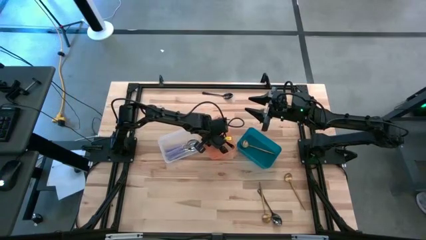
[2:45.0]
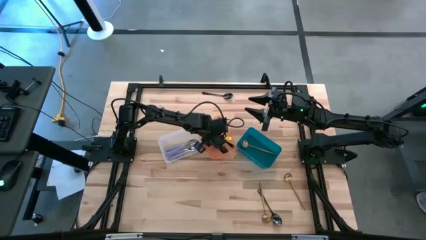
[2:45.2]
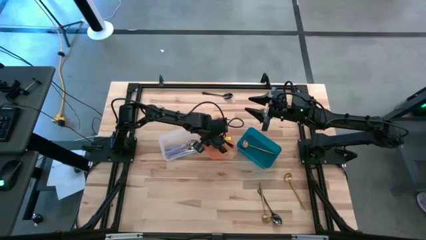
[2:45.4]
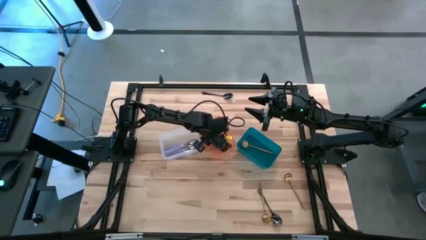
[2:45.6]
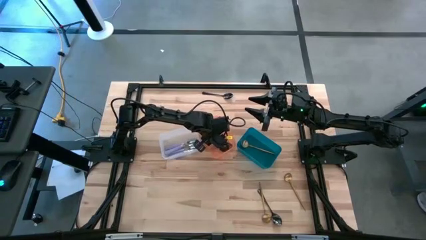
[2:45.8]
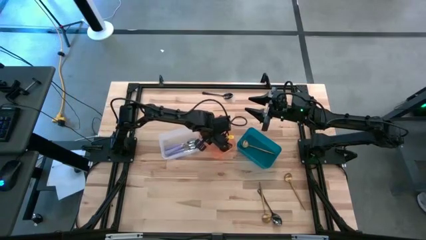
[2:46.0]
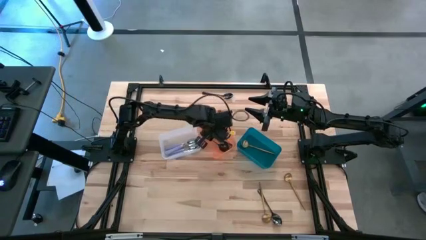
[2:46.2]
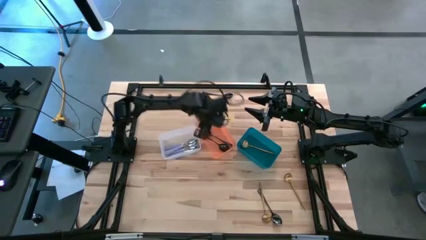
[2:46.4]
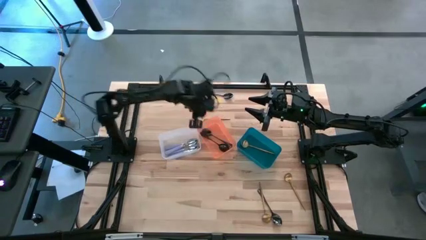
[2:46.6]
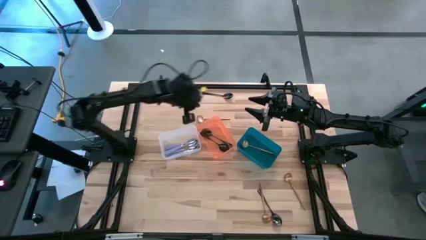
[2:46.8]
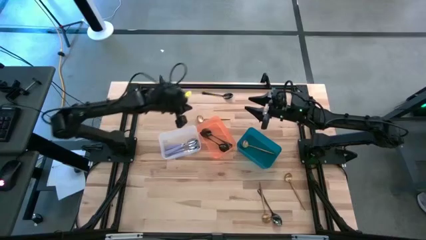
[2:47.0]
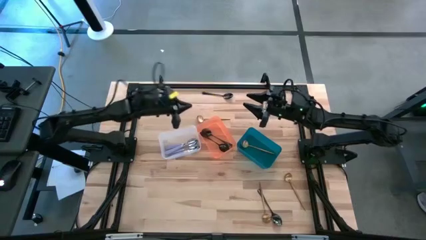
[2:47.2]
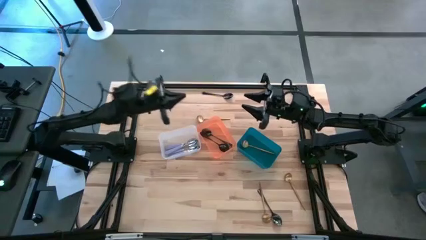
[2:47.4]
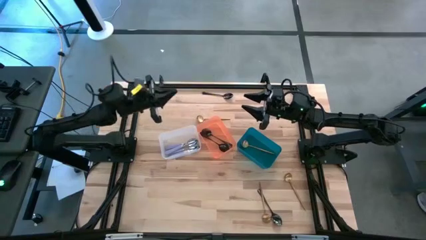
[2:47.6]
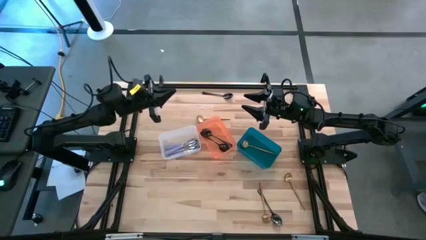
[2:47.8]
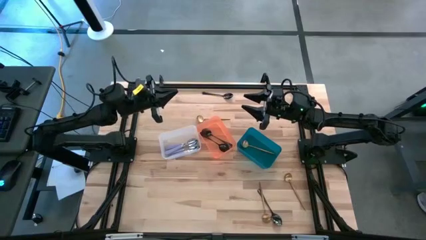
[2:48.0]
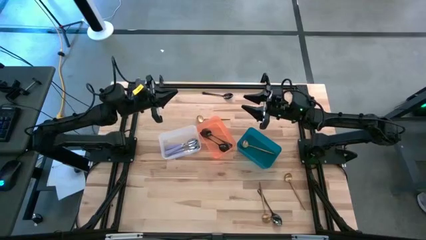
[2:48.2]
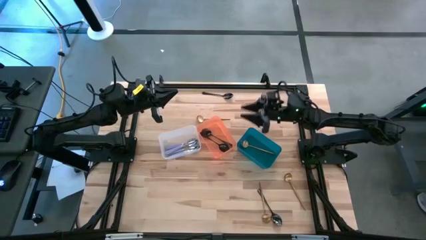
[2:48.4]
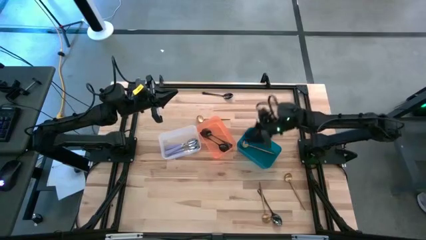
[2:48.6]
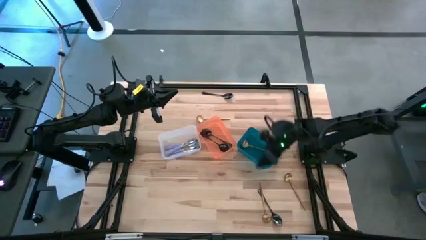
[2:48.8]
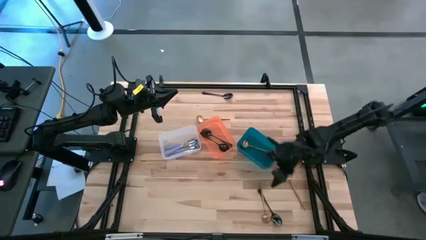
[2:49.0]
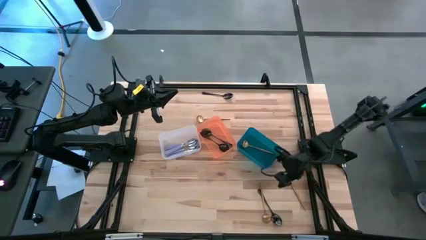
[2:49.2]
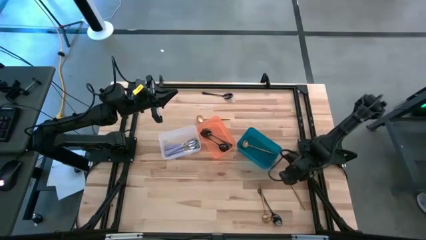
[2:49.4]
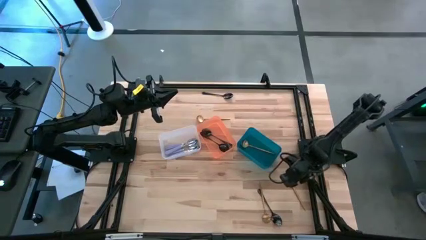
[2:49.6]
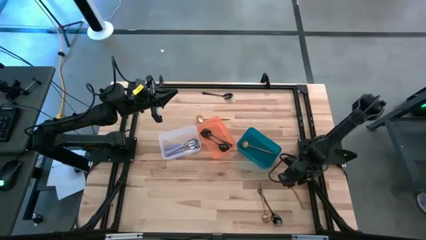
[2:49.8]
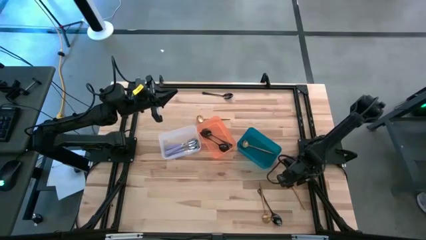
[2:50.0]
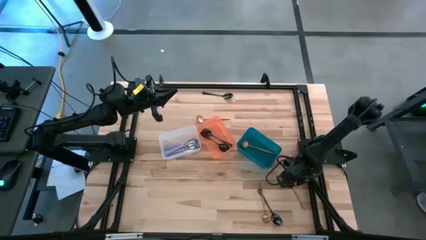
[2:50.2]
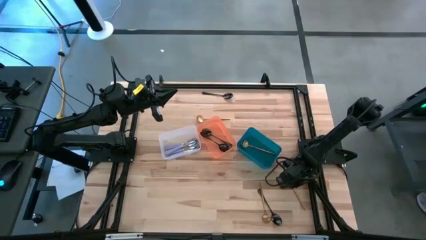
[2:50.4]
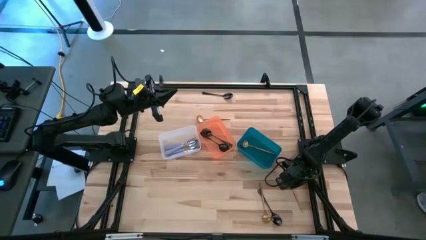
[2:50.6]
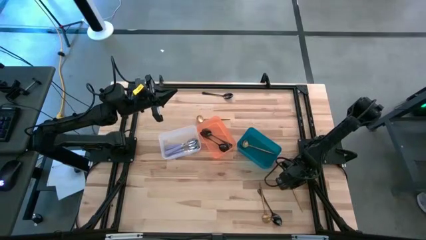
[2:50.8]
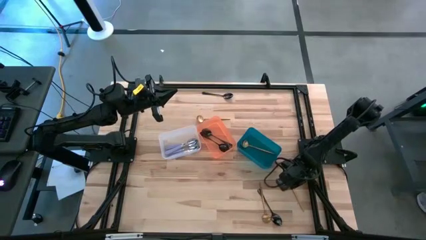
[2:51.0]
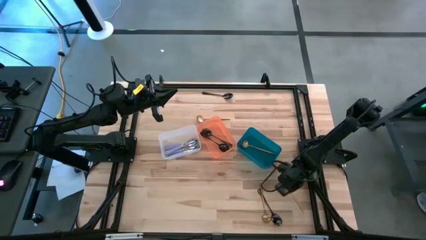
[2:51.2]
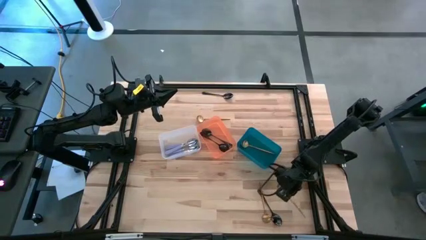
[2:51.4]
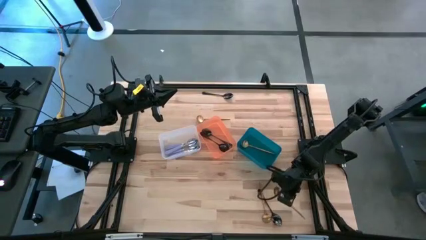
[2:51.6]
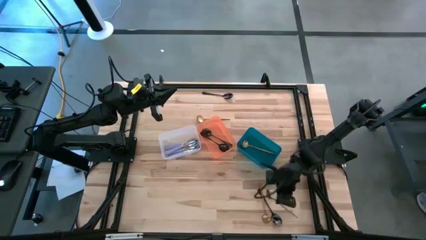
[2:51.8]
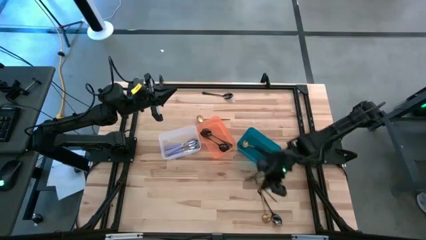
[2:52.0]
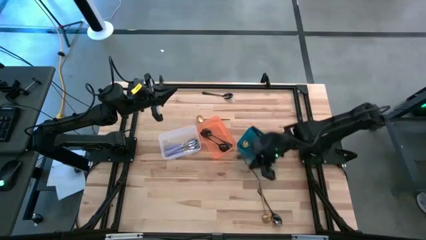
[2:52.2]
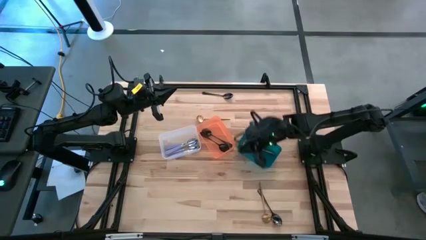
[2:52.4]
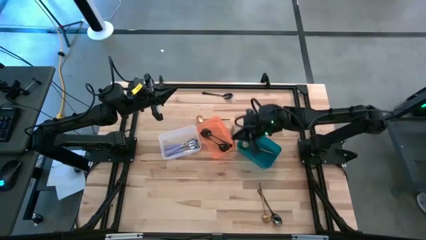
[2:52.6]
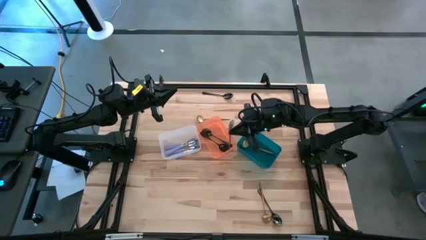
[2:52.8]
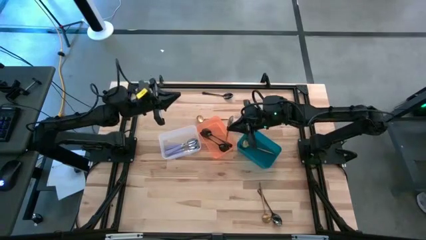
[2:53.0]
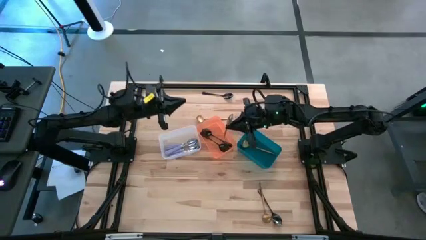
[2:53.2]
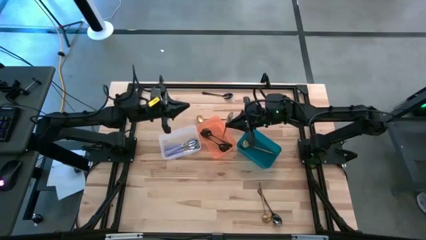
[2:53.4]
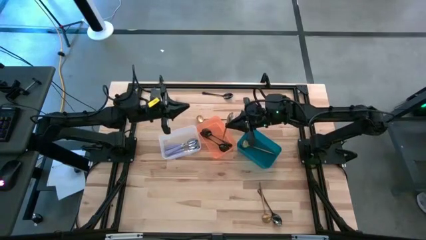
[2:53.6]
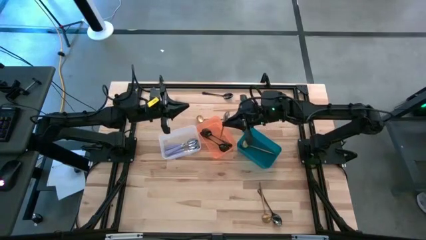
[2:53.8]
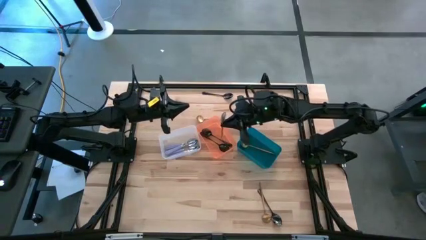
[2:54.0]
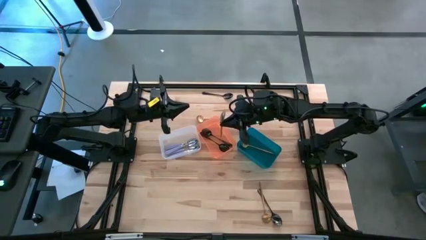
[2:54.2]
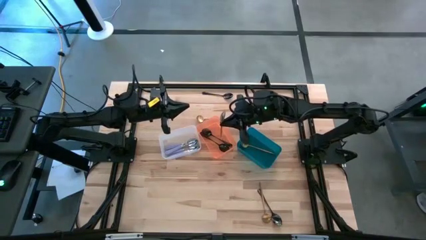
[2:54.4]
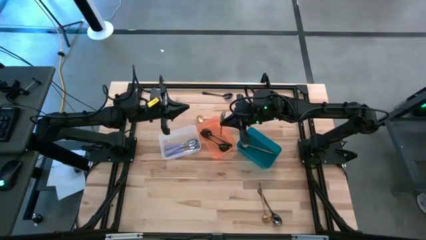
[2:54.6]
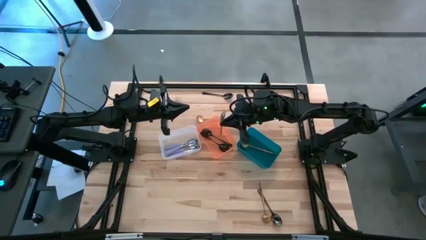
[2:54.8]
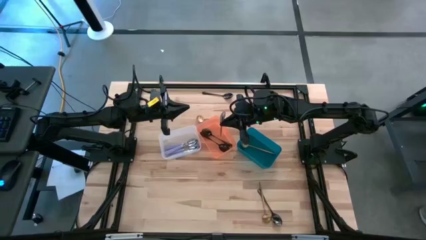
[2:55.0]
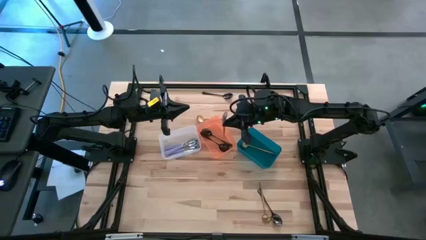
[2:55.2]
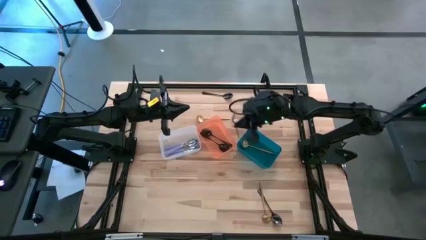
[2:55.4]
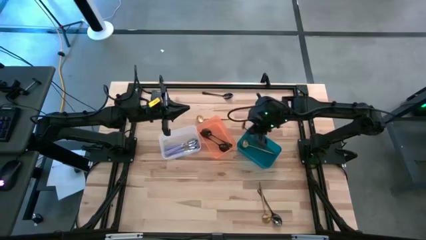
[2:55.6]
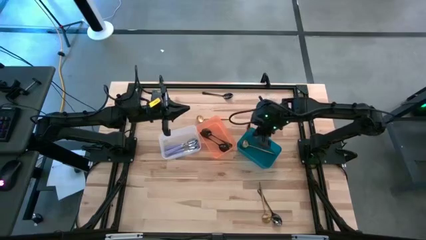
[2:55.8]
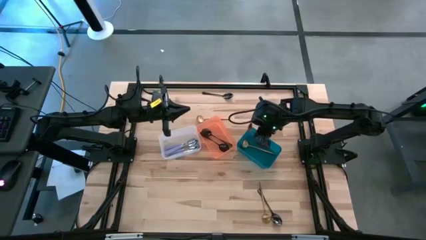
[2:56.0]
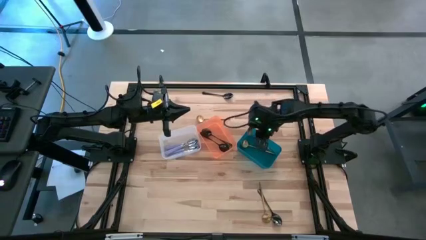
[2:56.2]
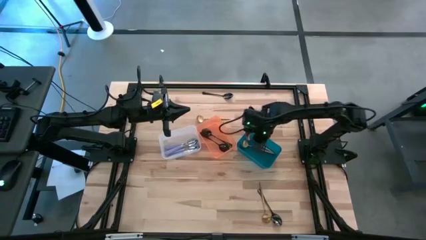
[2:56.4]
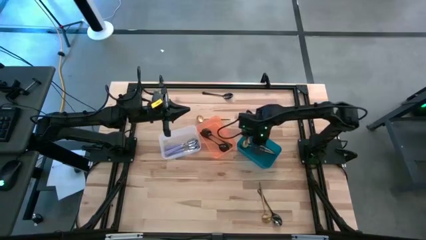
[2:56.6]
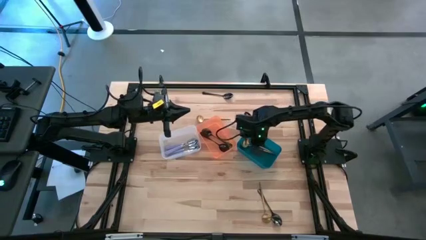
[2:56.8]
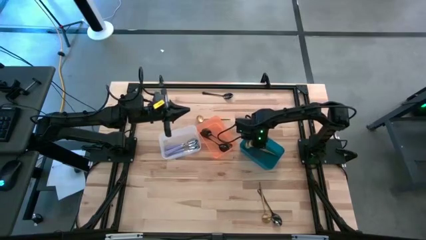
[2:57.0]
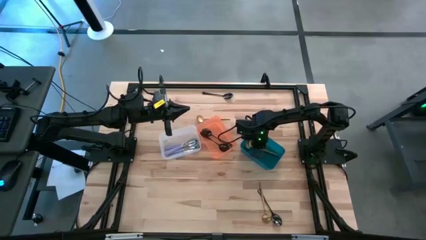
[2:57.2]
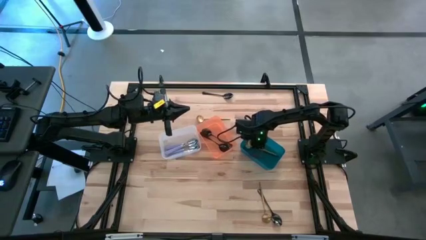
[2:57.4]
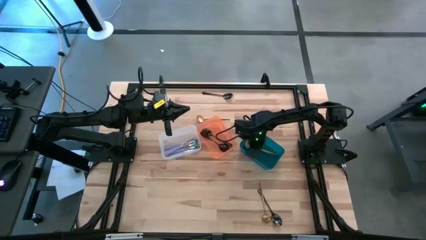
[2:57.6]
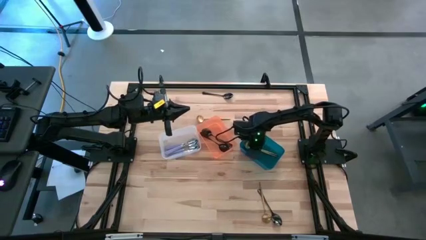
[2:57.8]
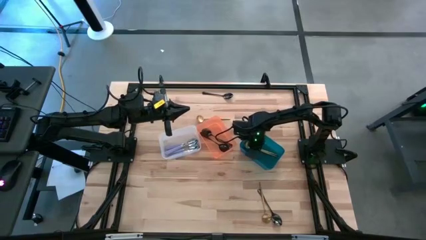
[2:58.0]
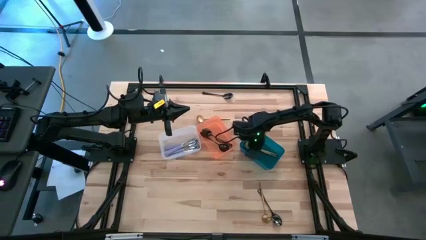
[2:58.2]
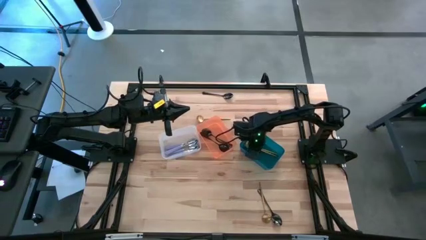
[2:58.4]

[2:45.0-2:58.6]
Task: Sort silverware by color (type)
Put the gold spoon into the blue bin
